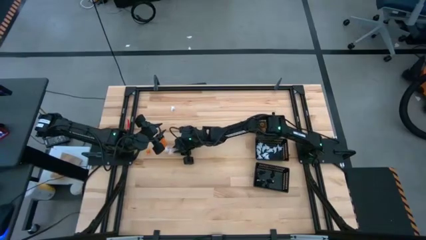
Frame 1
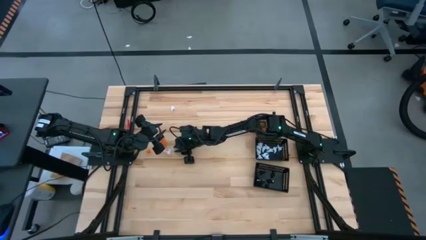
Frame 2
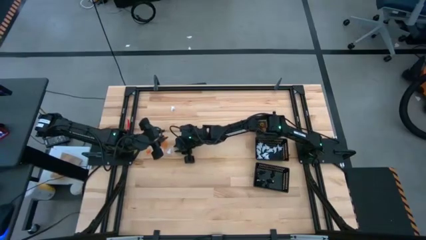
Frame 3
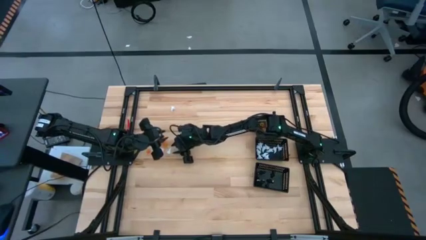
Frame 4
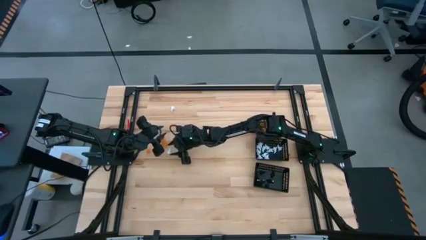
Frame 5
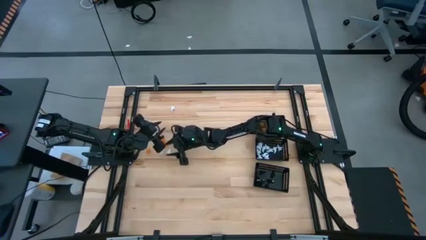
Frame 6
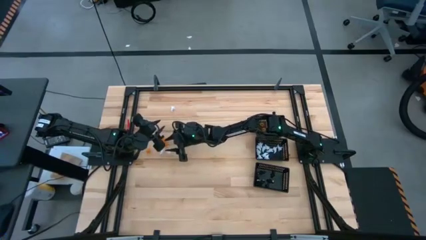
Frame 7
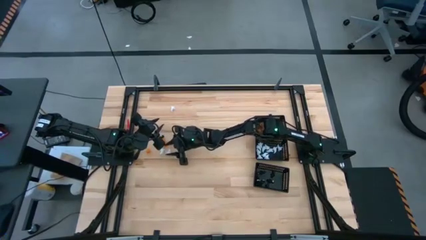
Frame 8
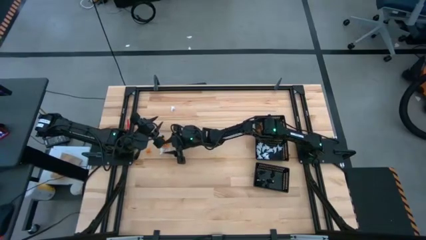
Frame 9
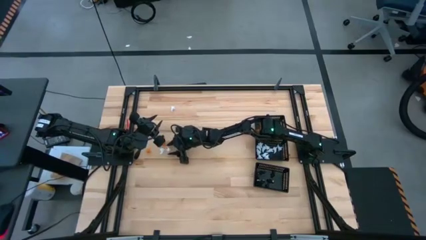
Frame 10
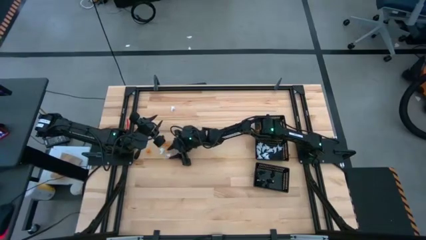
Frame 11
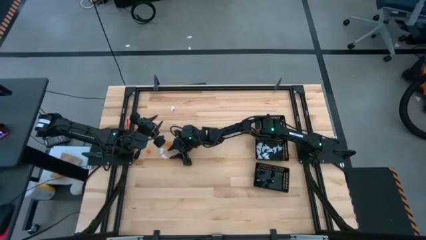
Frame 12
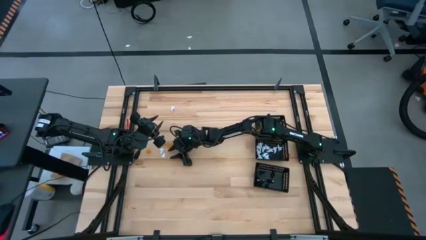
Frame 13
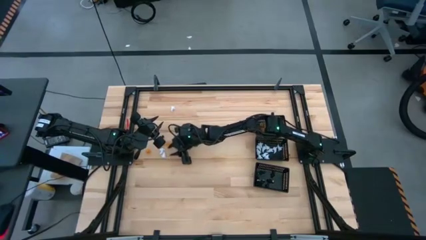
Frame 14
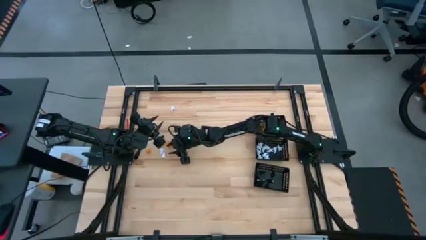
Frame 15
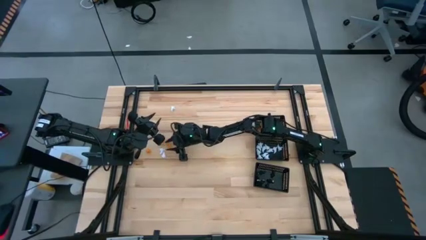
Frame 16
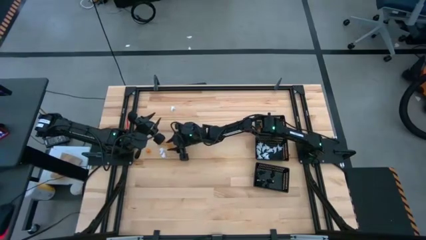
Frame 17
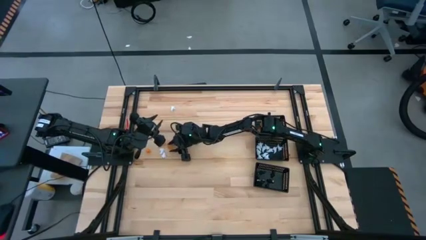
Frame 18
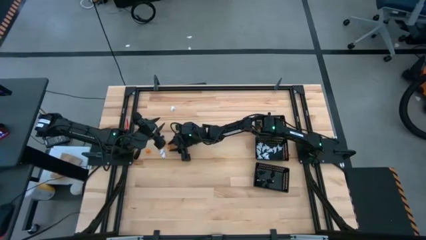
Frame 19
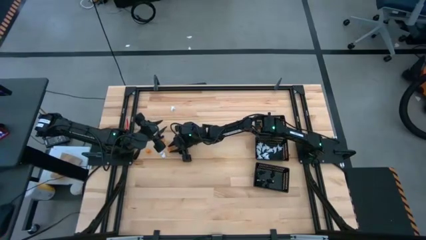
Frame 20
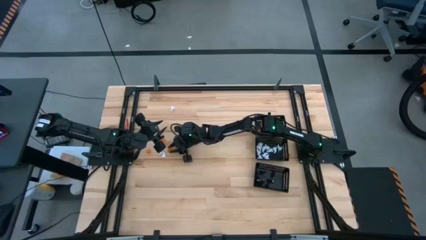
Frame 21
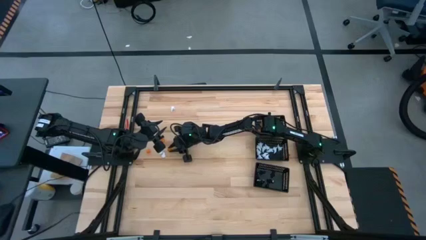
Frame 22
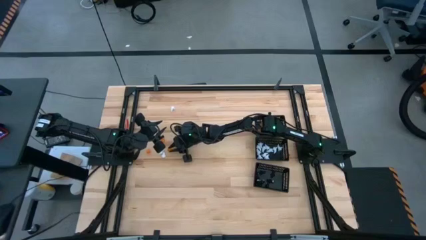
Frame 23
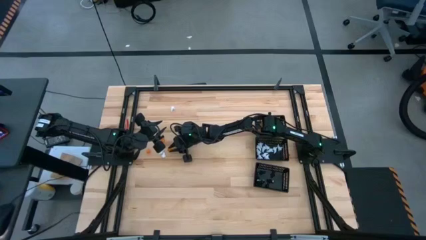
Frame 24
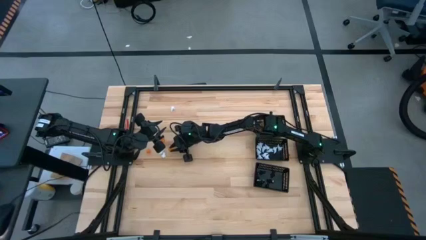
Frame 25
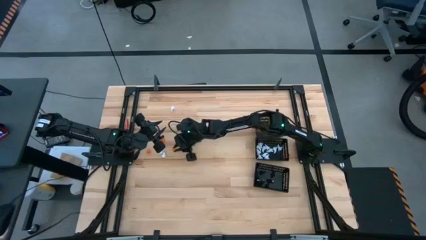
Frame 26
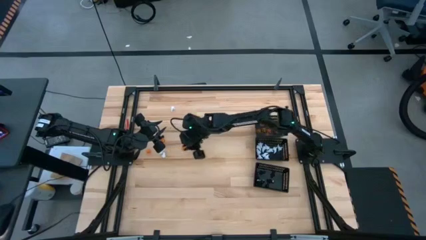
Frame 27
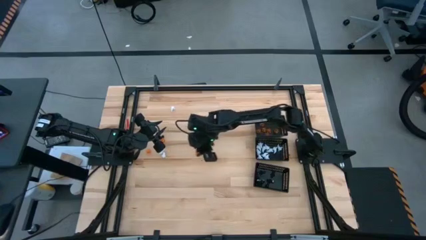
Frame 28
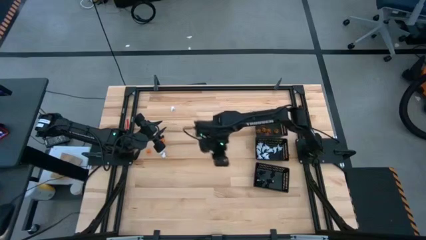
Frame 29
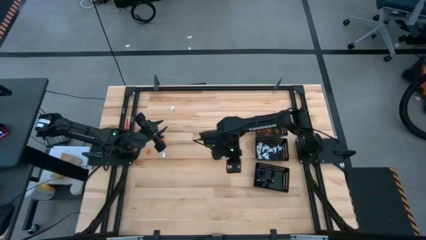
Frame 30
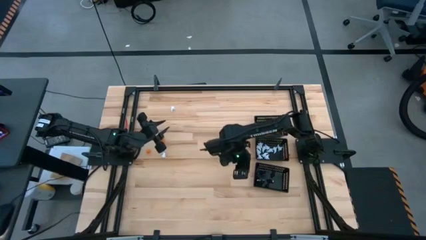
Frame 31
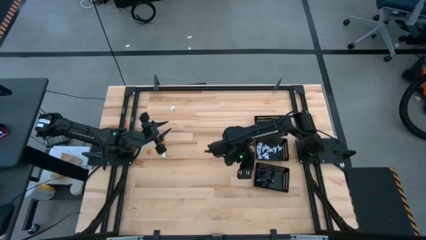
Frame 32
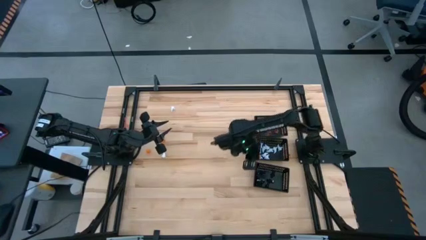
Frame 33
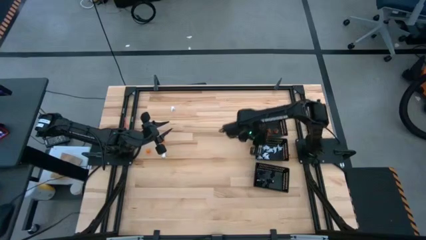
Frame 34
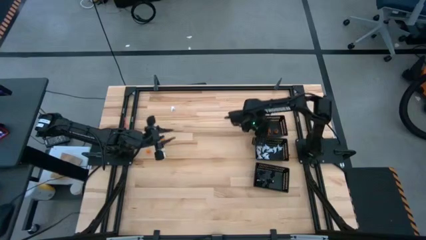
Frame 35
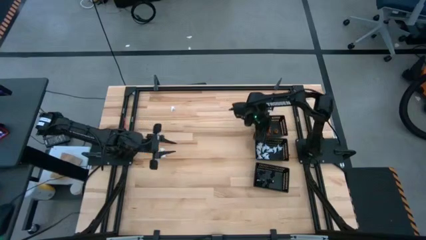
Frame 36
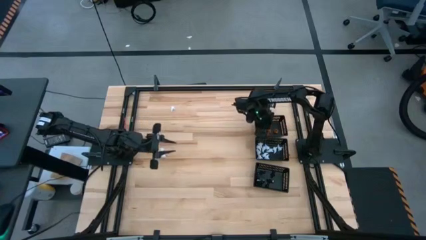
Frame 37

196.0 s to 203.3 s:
Task: Sort Halloween decoration
Put the orange pumpkin toy into the top black bin

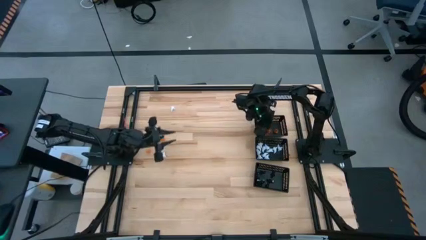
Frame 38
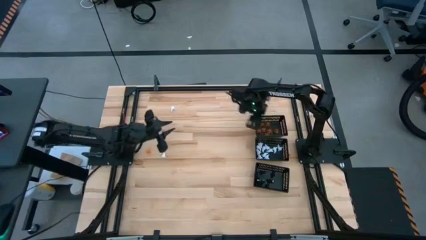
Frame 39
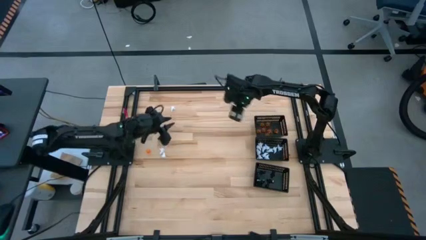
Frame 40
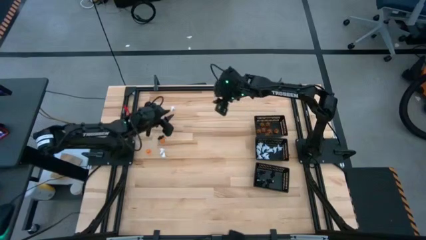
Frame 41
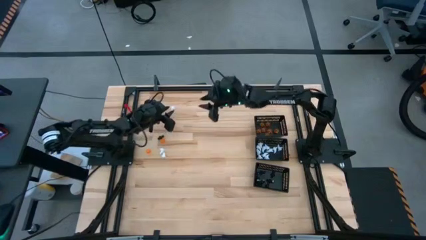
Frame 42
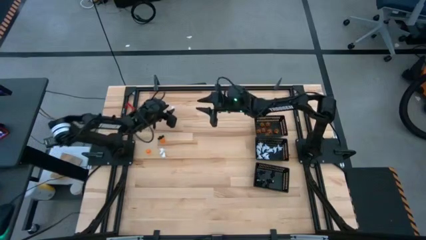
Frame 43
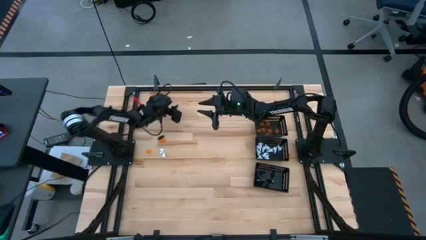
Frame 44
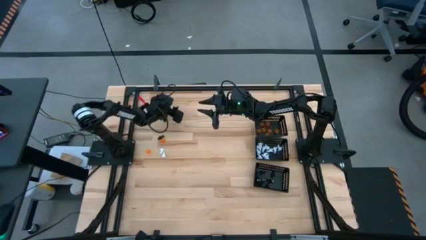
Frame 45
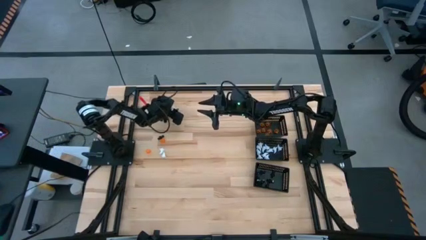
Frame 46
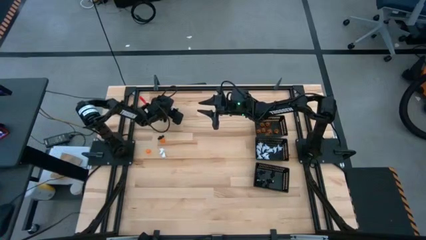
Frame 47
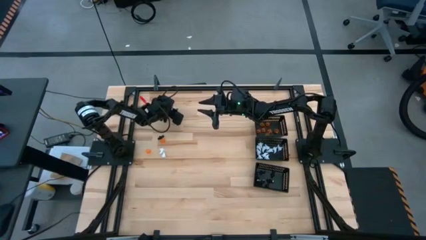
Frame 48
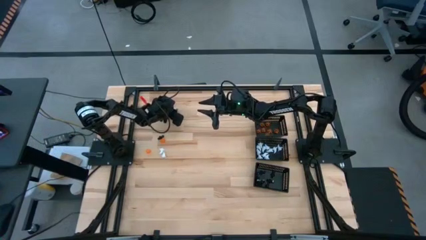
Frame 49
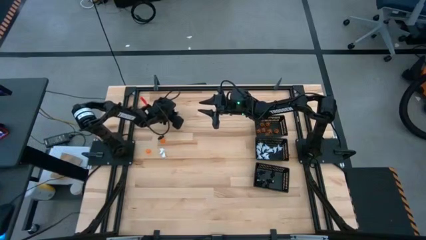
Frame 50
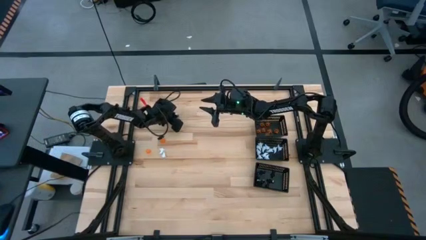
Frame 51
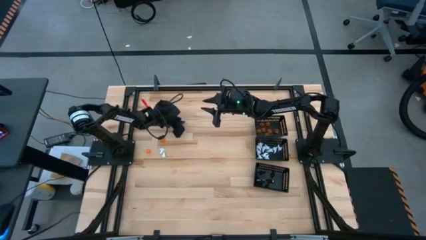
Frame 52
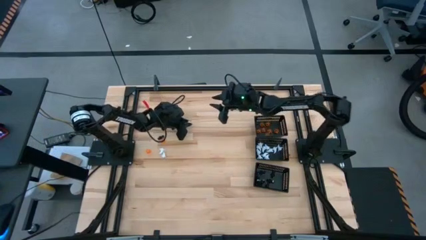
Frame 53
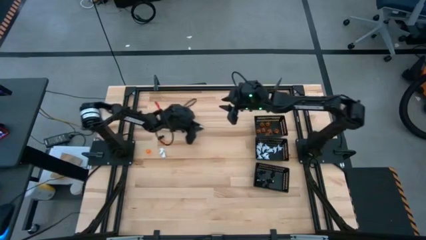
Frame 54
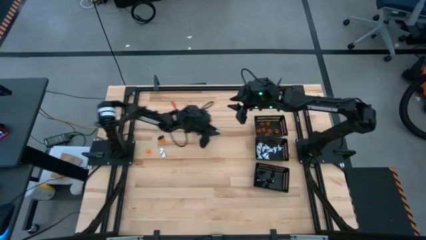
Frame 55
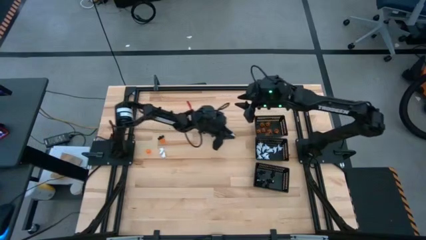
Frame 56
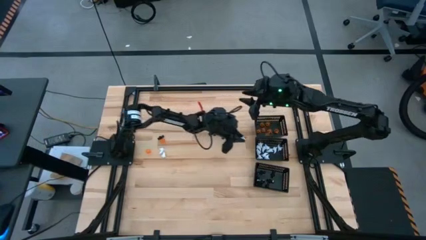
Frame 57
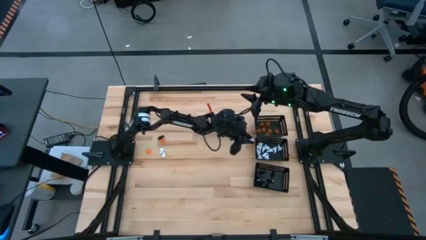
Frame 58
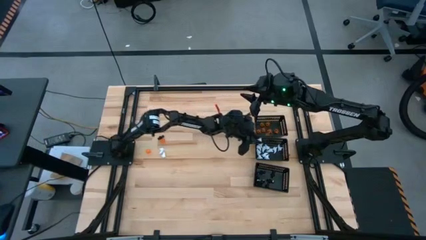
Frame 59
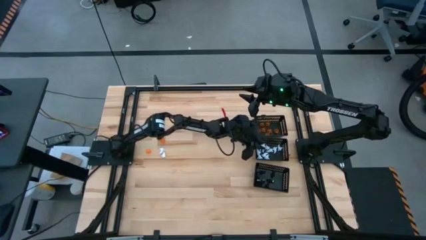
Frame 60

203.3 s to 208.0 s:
Put the white ghost toy into the center black bin

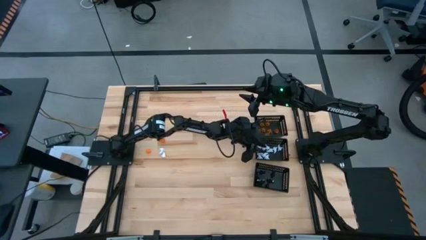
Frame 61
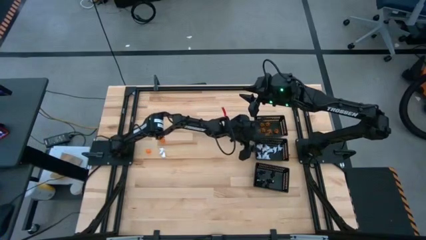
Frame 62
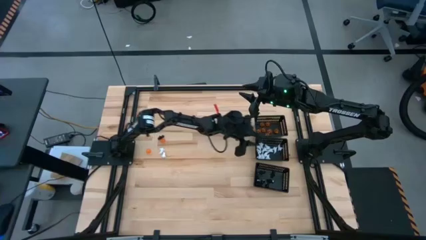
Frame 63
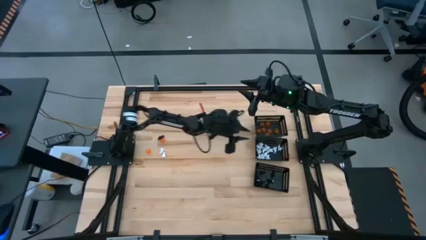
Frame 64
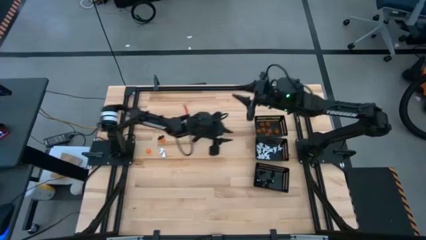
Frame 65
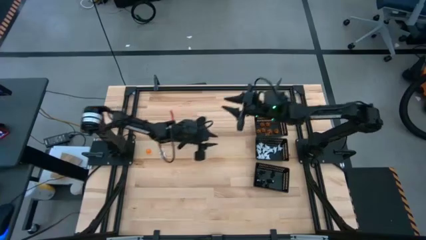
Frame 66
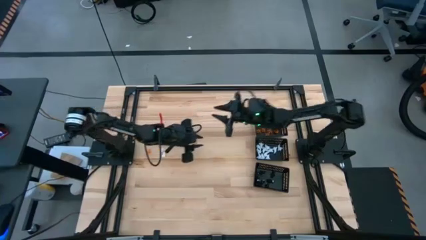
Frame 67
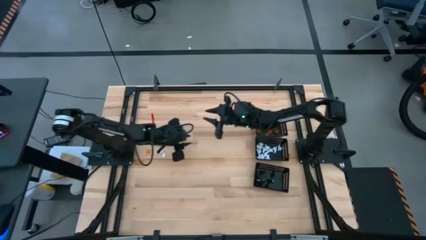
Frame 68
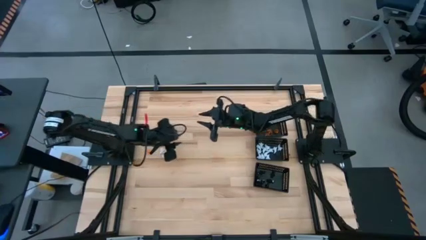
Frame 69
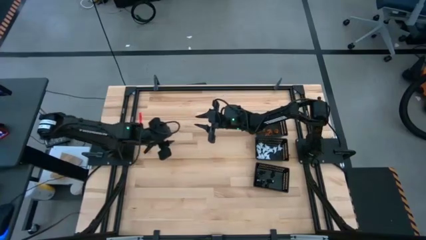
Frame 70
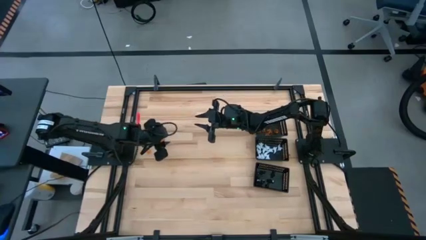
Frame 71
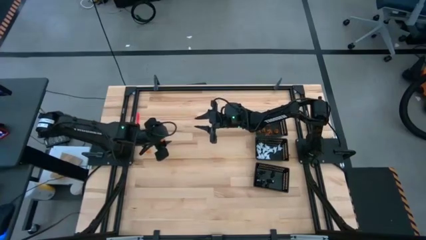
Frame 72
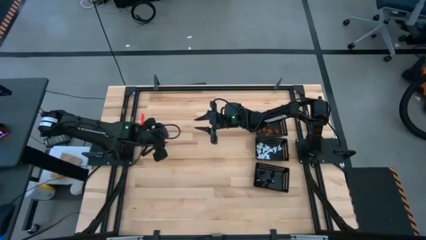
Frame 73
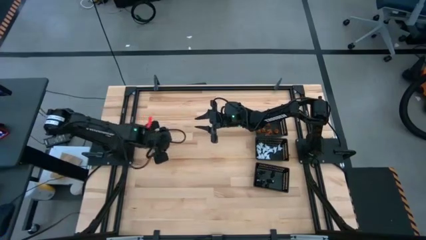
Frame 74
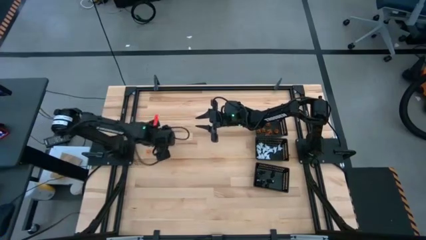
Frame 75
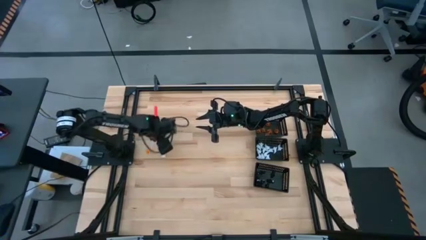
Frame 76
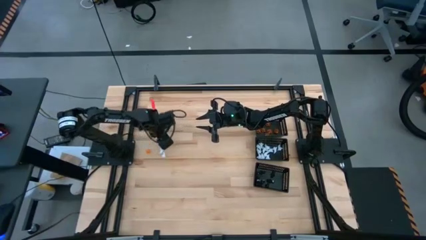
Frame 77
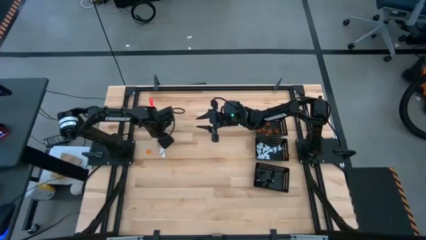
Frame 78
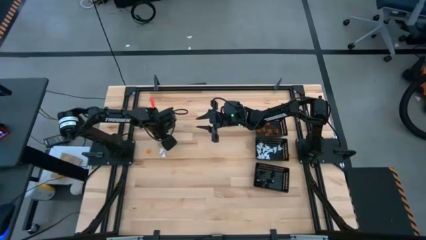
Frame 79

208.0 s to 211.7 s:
Adjust the toys
